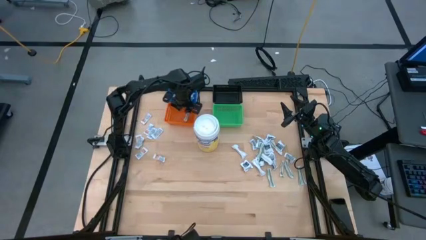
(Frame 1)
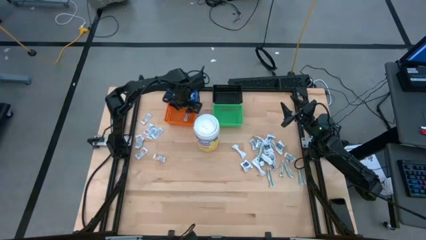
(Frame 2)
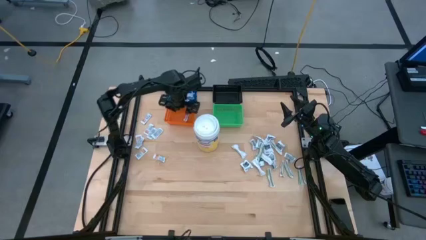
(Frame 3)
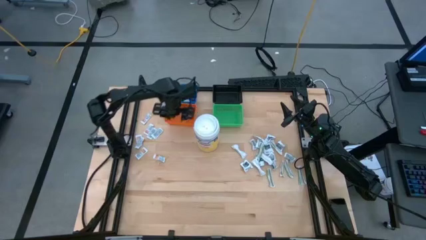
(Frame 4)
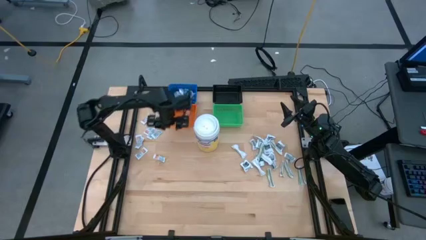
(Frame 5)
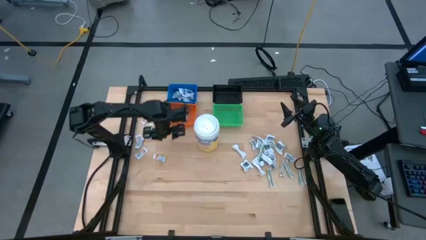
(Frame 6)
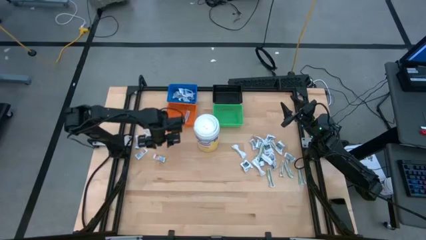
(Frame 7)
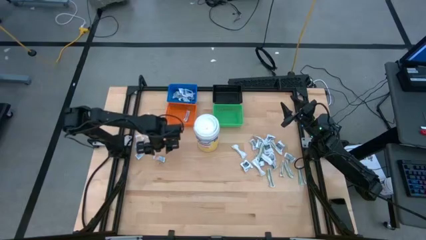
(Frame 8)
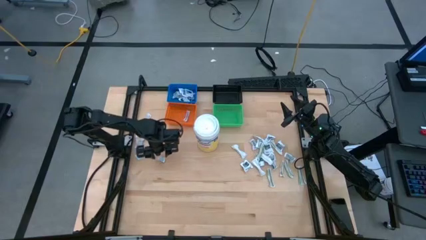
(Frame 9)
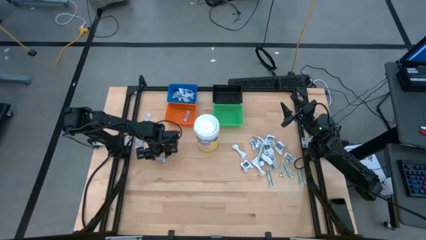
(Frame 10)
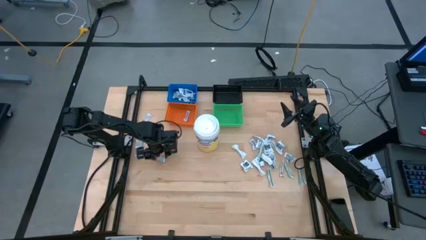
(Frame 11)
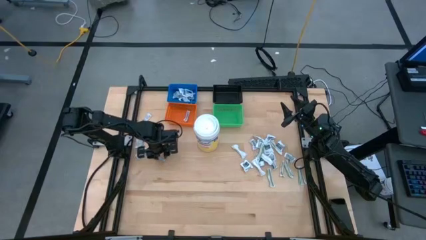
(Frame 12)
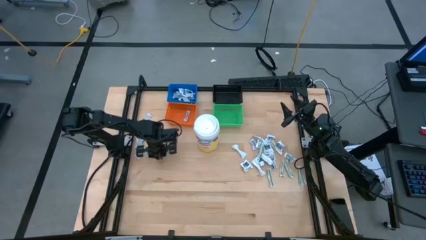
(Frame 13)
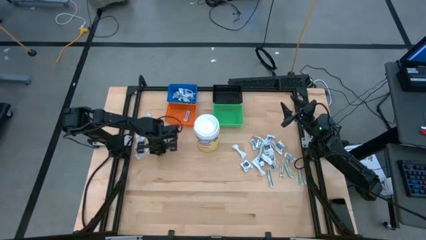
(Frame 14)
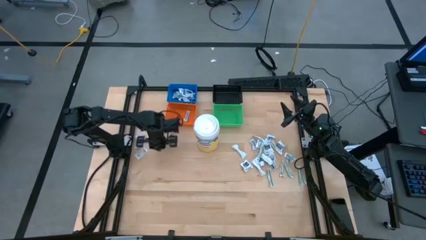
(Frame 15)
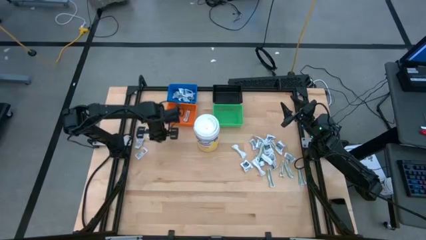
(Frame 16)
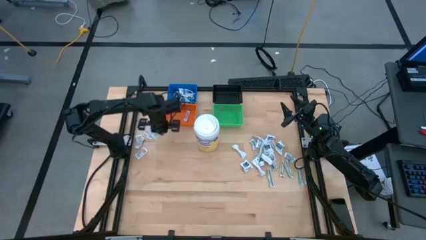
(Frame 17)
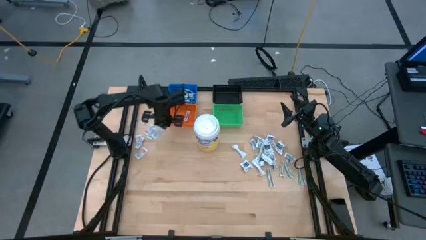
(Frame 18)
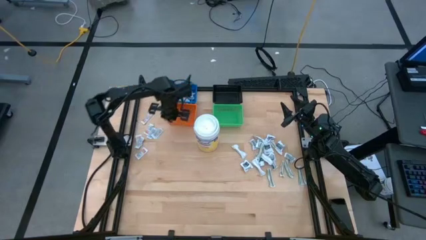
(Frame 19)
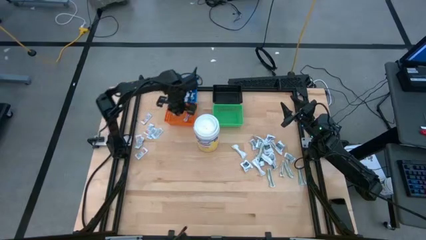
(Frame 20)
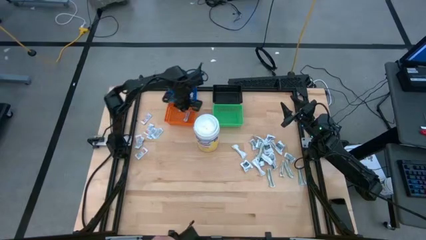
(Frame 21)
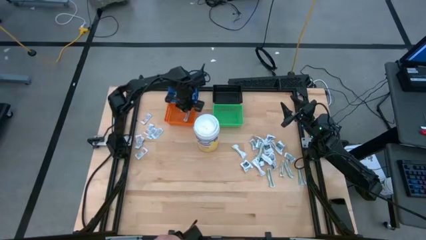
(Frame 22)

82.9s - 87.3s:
Task: Pick & Place First Aid Supplies
Put the orange ointment pack into the orange bin

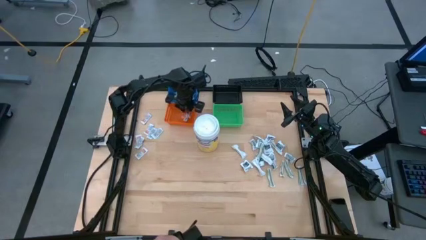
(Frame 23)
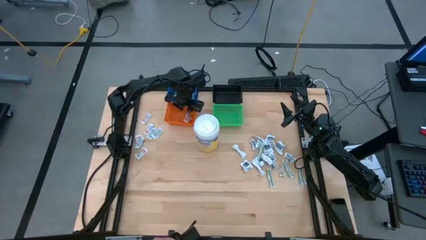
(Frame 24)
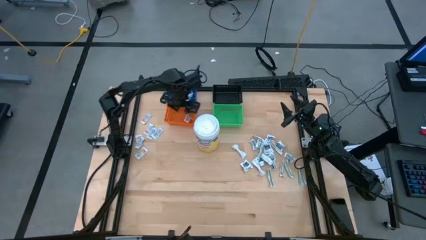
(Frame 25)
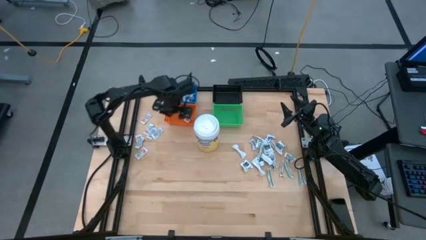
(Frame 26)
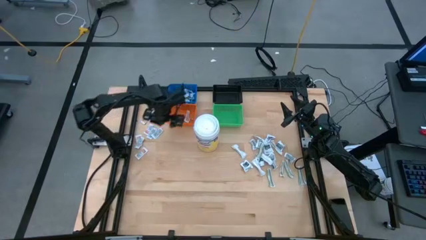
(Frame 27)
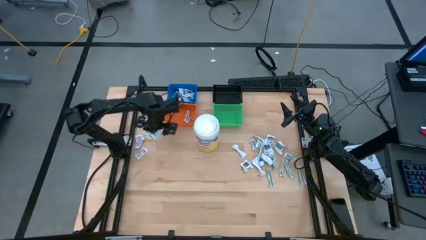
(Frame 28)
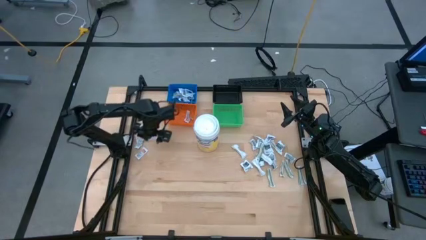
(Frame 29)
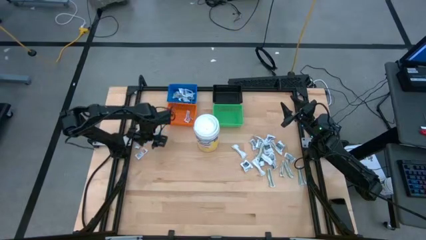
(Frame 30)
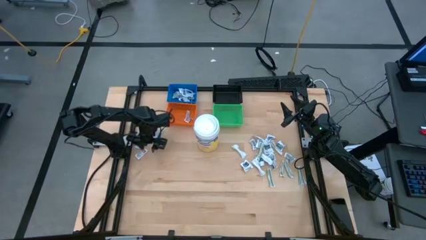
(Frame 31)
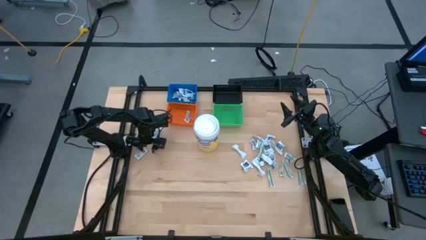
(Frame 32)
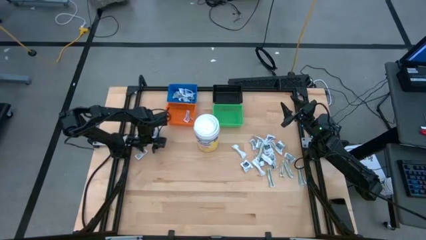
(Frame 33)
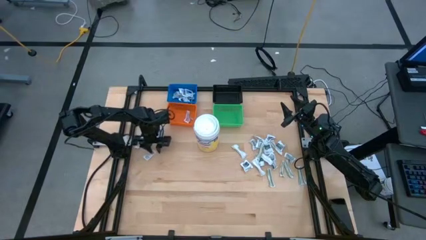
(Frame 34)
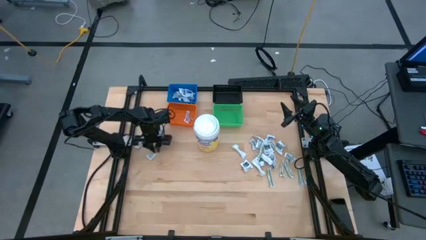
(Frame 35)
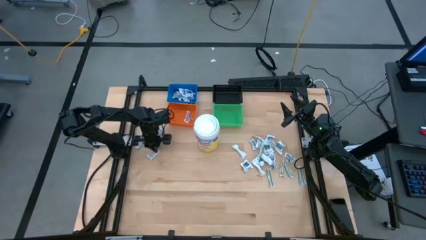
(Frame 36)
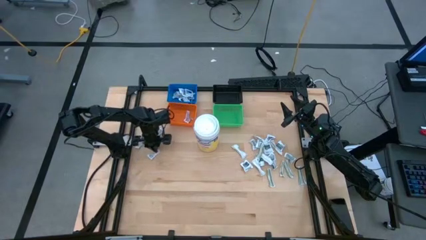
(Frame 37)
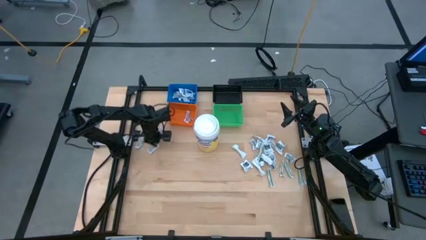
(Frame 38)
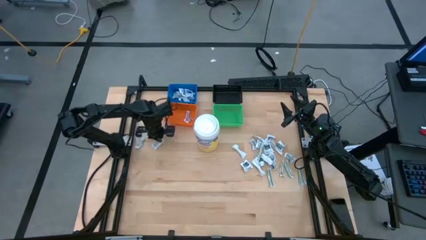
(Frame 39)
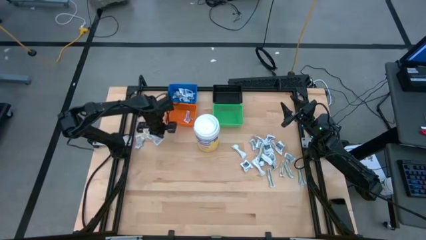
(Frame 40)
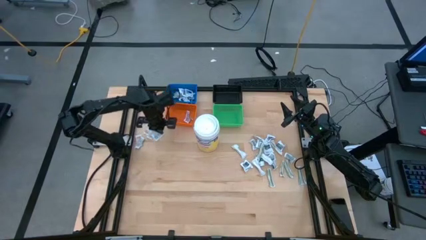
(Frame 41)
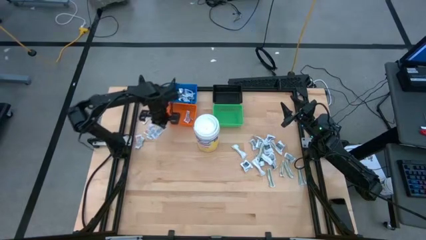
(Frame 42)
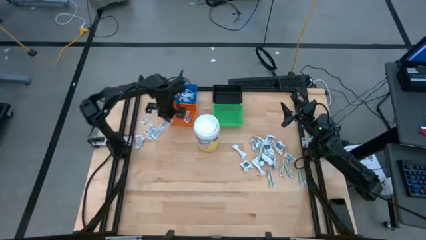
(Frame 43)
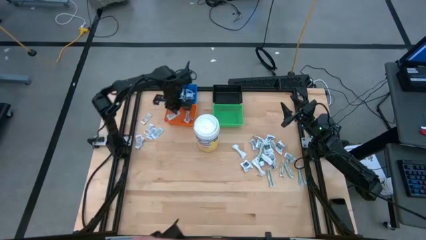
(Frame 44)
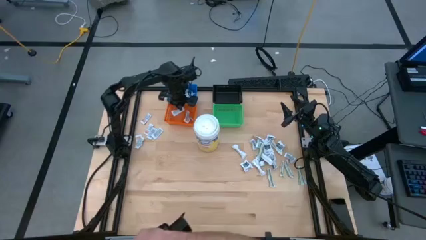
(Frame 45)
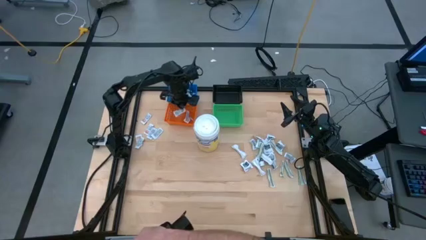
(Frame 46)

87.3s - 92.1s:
Put the orange ointment pack into the orange bin

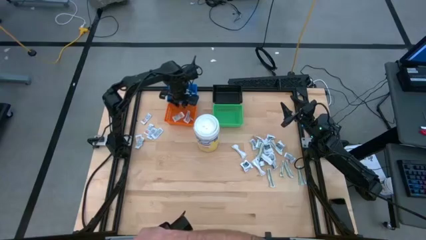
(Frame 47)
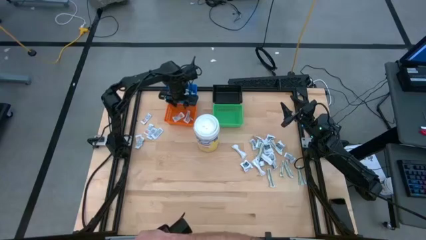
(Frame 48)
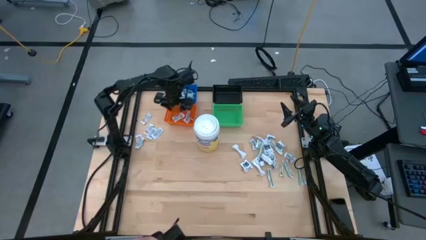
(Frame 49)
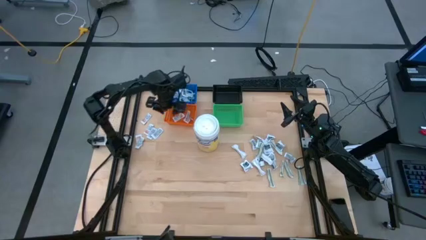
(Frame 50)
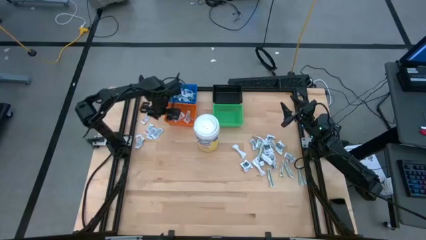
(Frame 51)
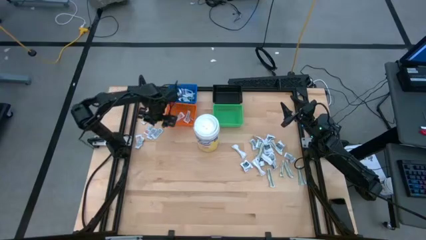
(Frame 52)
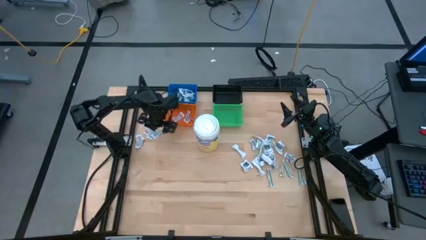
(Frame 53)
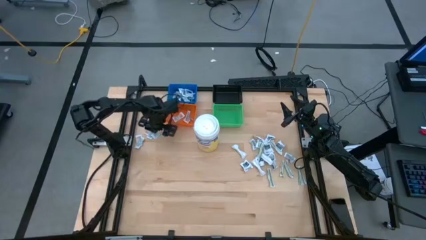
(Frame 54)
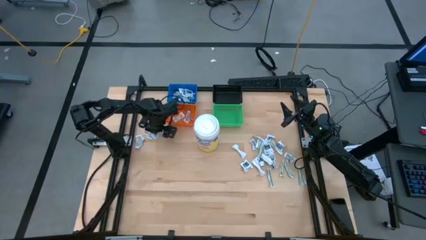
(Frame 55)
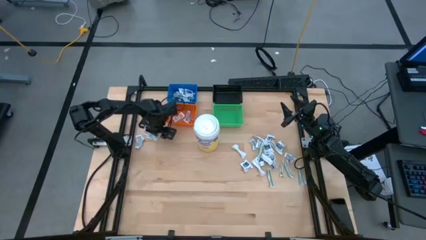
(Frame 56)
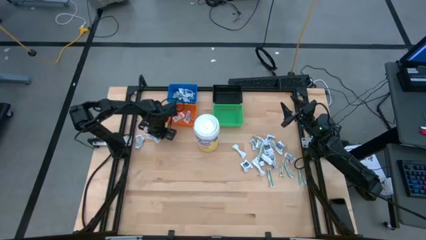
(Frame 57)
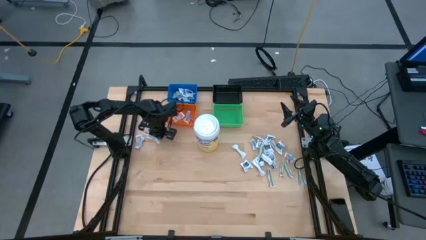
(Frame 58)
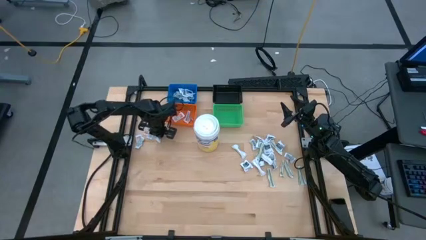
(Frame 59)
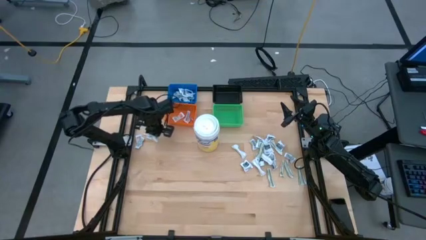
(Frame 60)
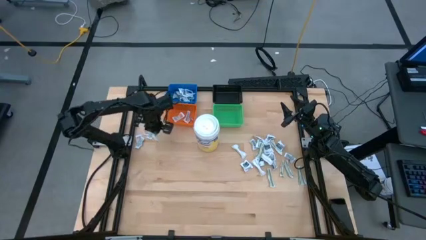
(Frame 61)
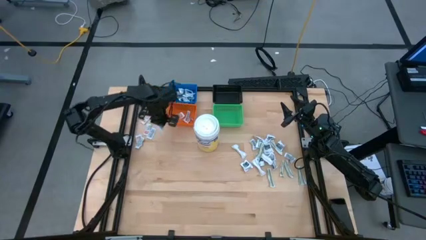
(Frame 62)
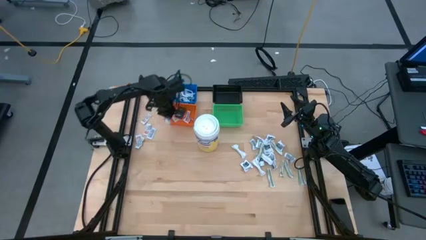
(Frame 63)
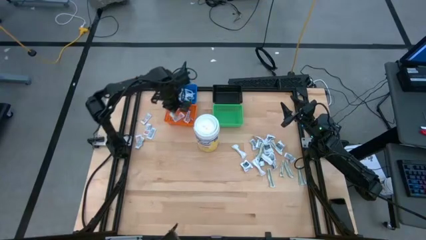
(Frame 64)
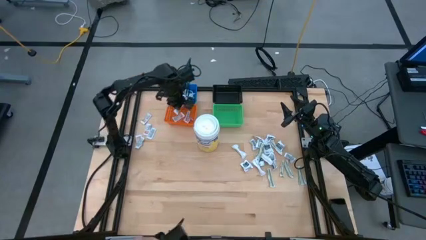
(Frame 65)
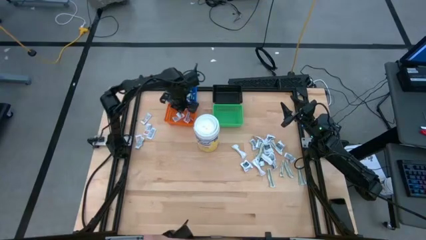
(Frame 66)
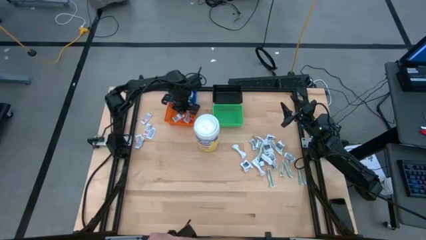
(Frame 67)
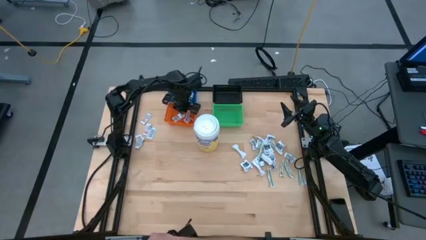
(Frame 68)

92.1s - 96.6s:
Put the orange ointment pack into the orange bin

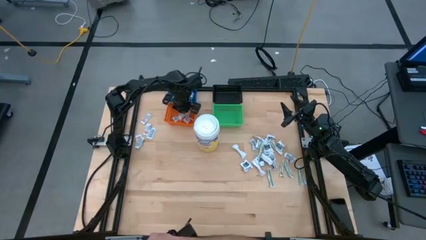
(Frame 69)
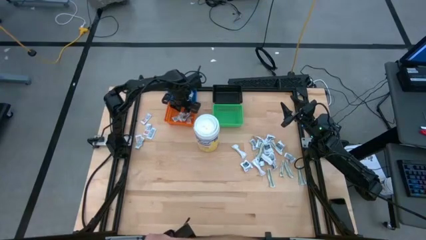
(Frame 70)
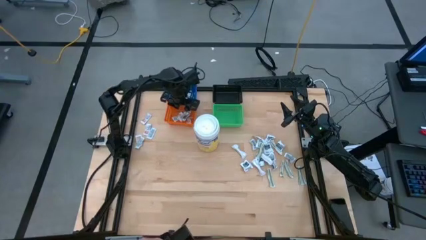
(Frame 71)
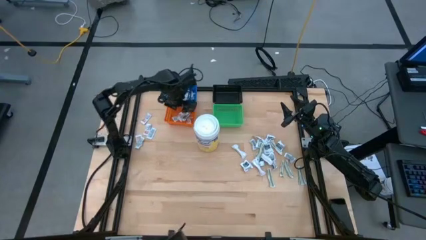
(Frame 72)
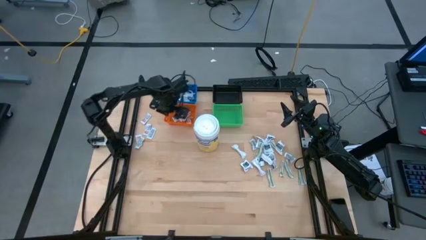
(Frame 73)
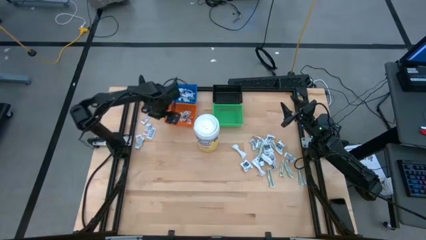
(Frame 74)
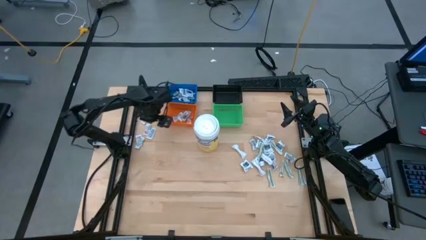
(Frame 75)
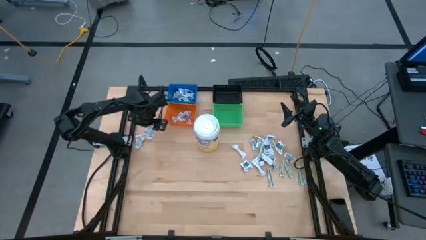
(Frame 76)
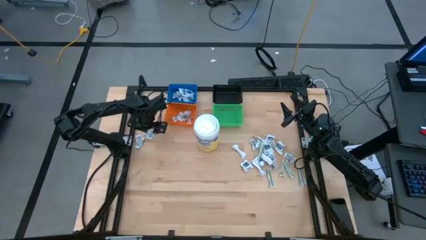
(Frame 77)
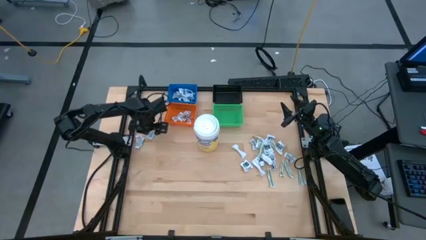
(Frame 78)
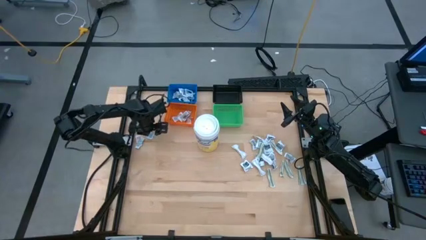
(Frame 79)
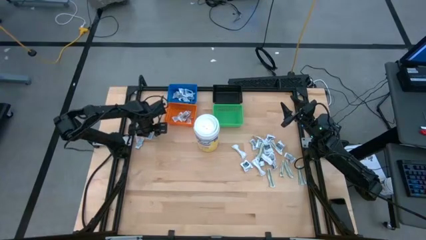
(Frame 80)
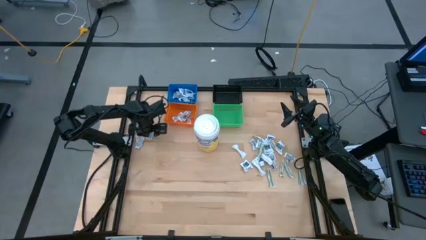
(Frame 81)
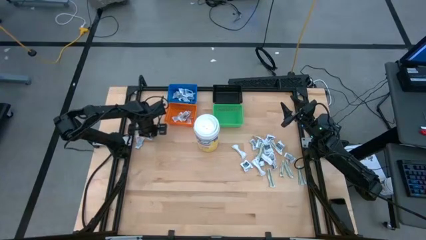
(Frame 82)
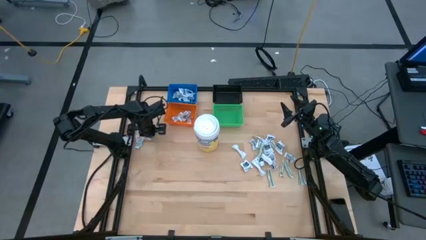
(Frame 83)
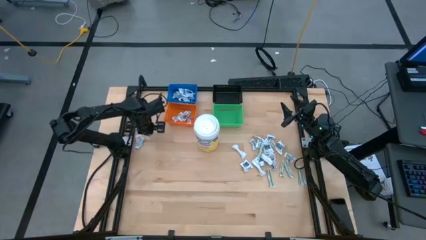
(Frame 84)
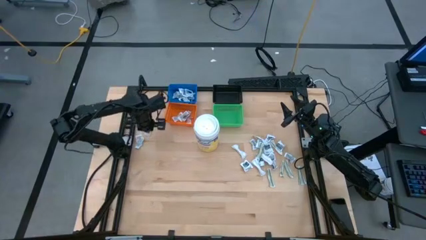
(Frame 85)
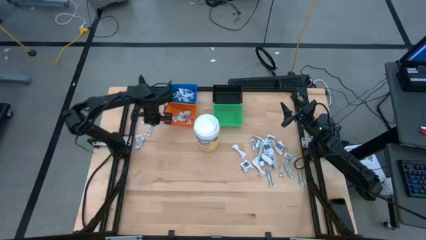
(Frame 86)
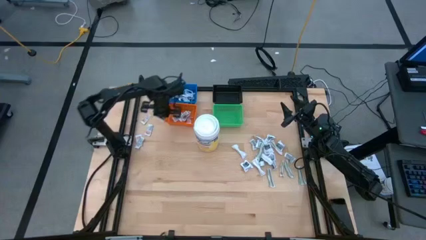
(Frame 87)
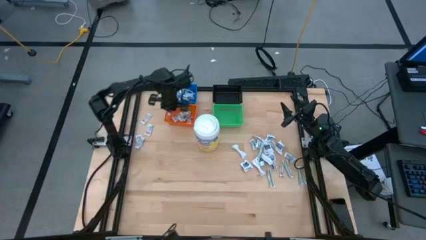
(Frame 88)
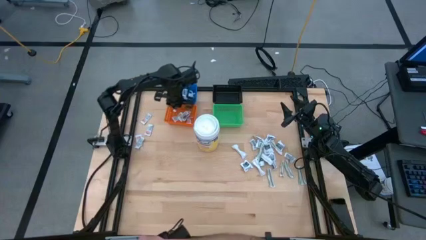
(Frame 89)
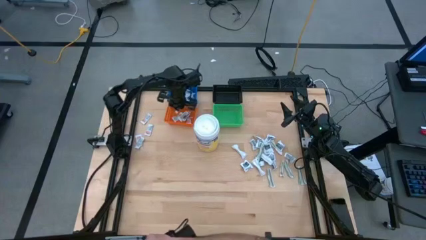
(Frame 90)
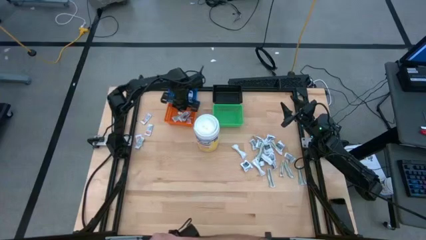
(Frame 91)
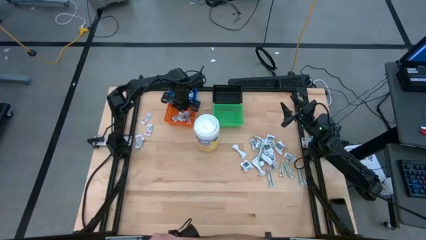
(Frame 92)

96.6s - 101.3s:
Put the orange ointment pack into the orange bin
